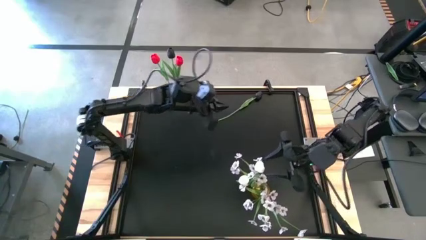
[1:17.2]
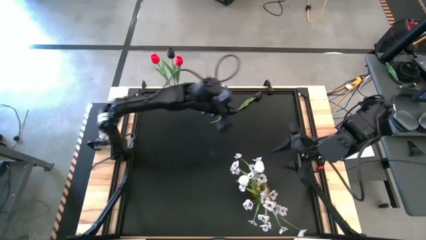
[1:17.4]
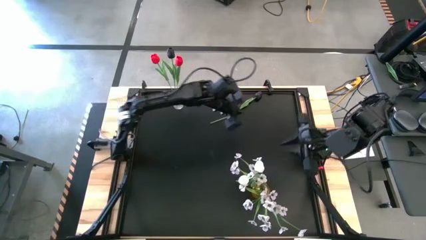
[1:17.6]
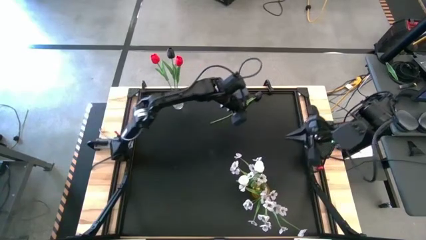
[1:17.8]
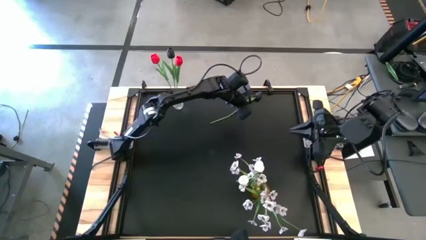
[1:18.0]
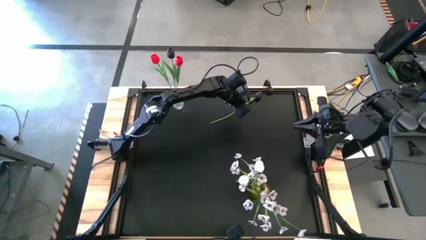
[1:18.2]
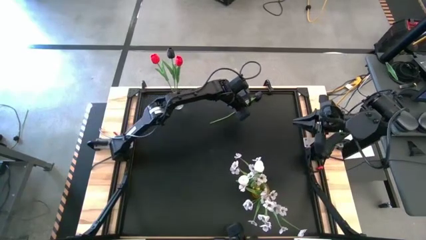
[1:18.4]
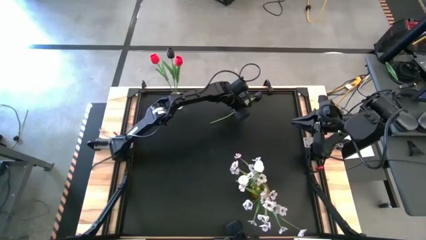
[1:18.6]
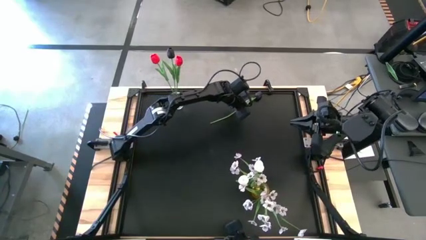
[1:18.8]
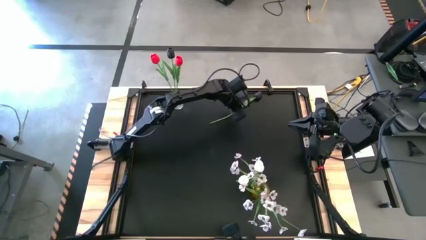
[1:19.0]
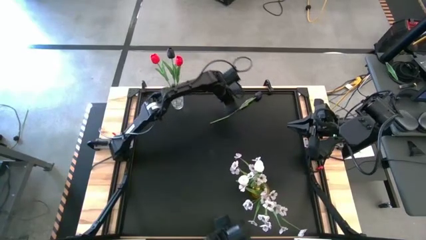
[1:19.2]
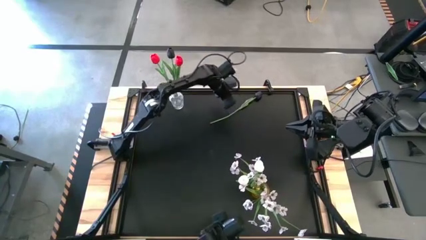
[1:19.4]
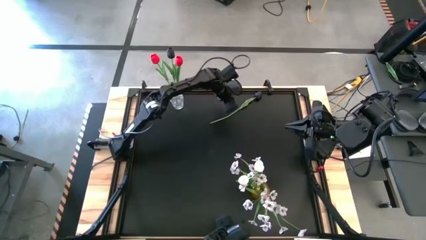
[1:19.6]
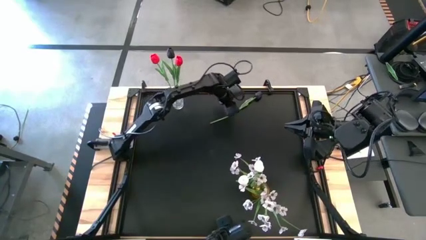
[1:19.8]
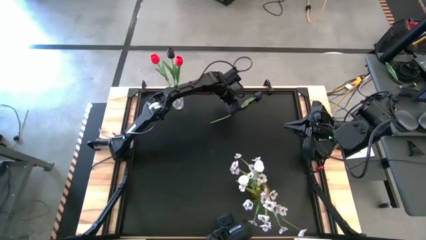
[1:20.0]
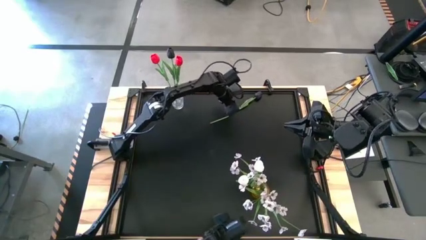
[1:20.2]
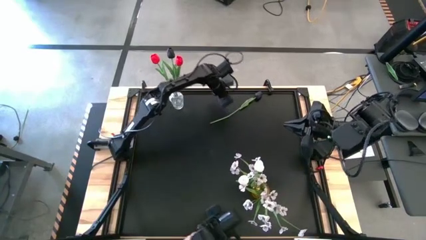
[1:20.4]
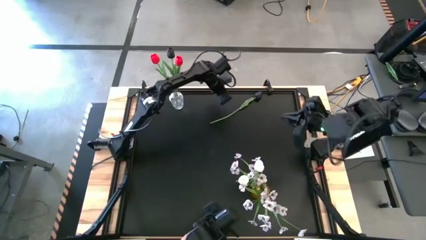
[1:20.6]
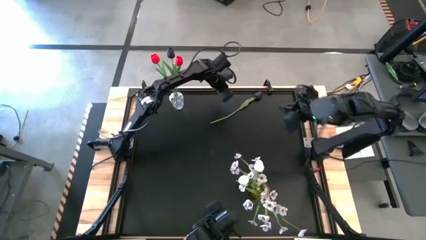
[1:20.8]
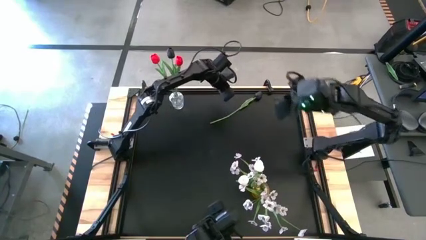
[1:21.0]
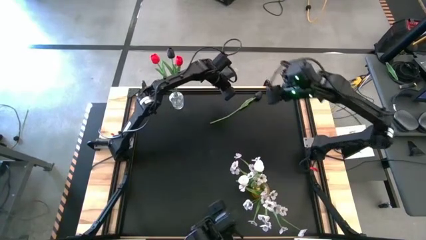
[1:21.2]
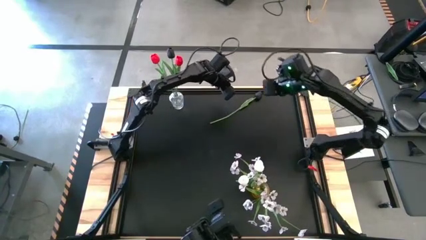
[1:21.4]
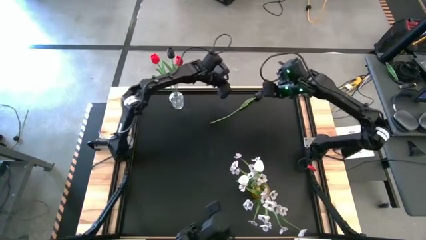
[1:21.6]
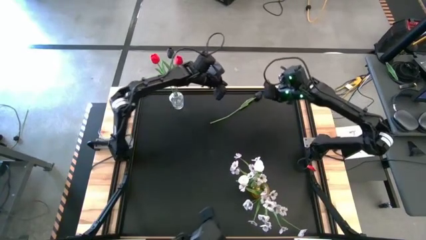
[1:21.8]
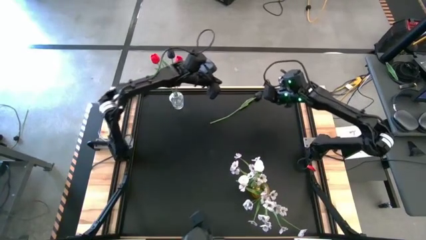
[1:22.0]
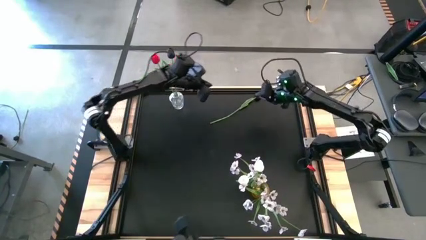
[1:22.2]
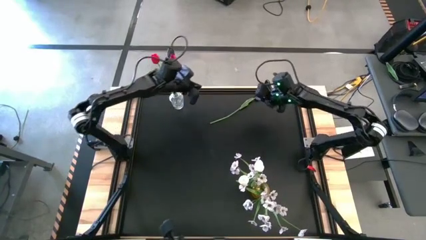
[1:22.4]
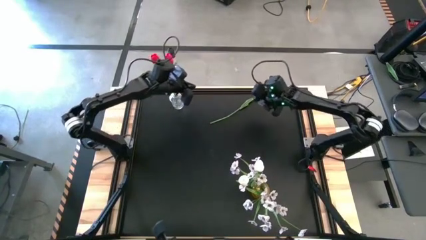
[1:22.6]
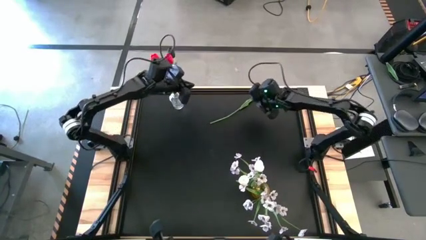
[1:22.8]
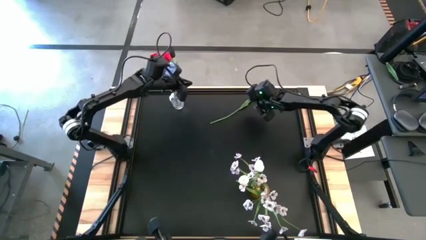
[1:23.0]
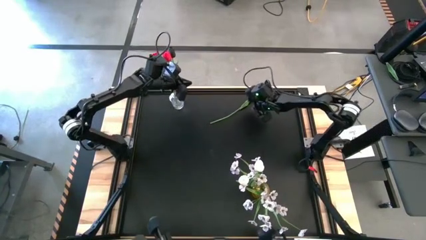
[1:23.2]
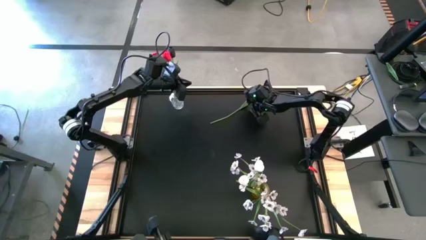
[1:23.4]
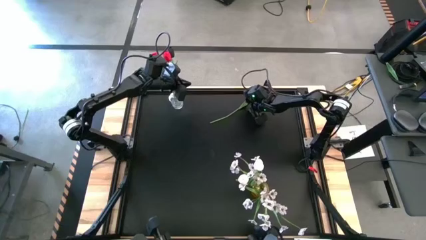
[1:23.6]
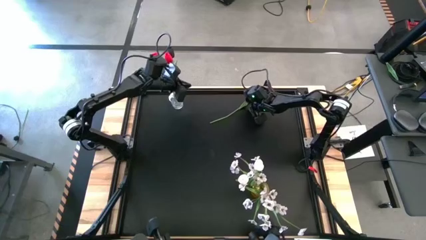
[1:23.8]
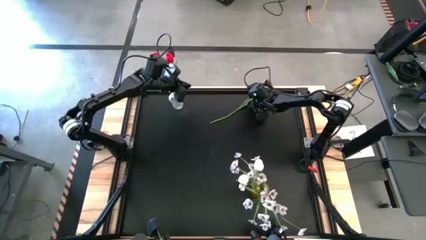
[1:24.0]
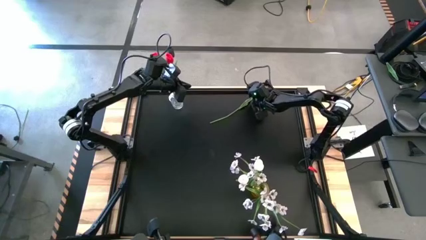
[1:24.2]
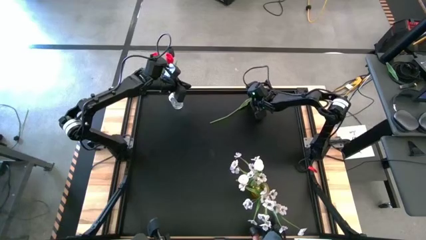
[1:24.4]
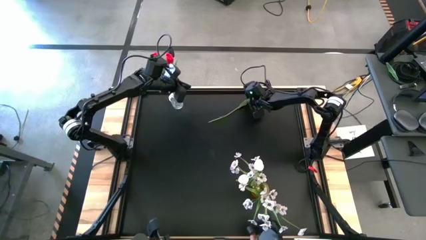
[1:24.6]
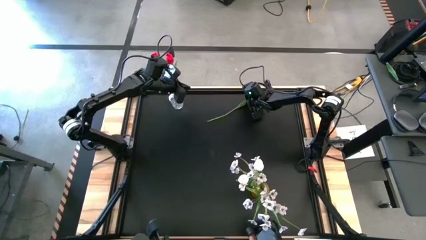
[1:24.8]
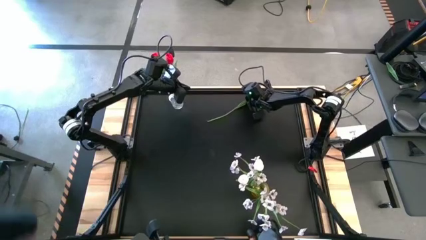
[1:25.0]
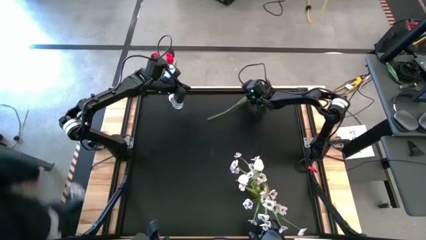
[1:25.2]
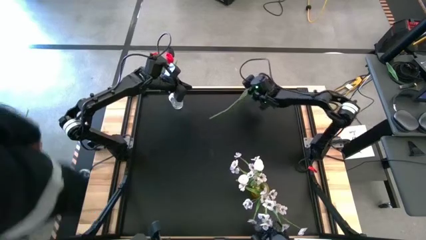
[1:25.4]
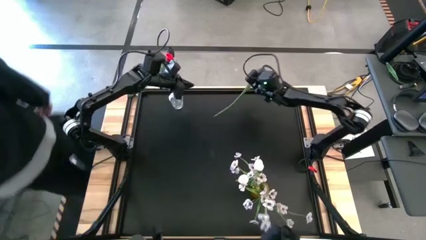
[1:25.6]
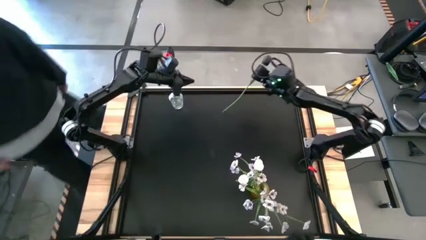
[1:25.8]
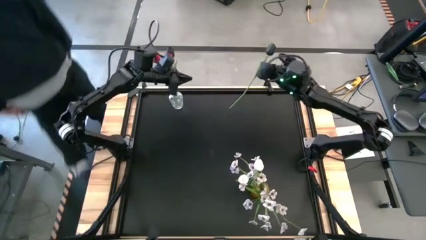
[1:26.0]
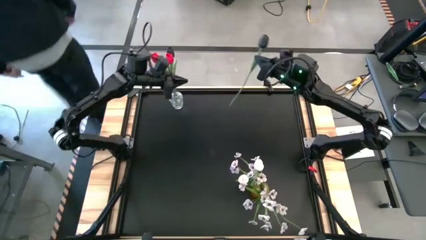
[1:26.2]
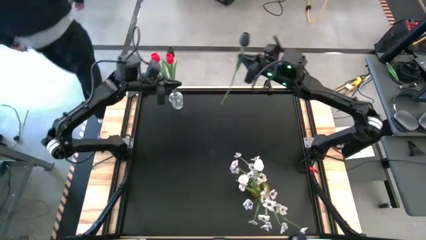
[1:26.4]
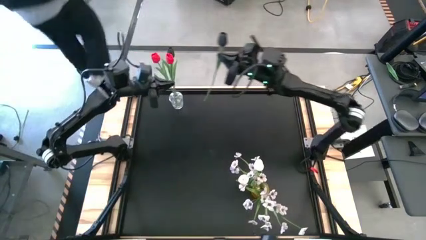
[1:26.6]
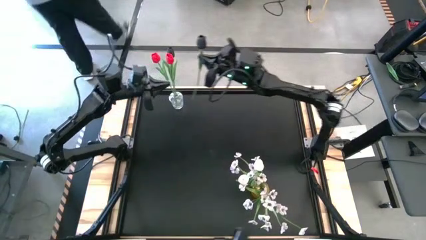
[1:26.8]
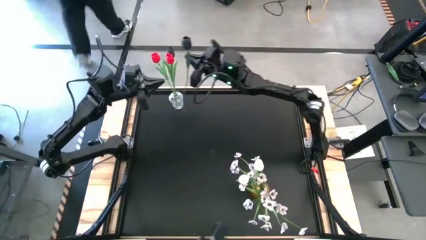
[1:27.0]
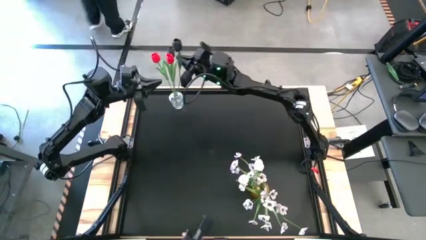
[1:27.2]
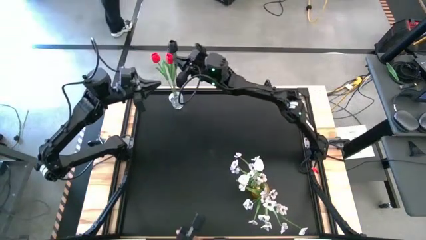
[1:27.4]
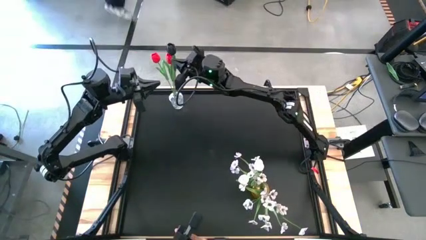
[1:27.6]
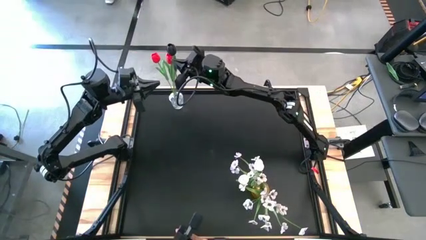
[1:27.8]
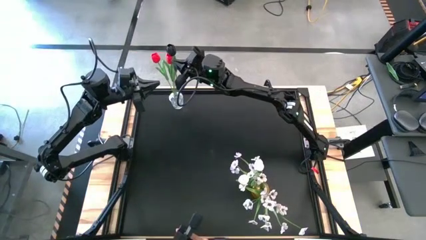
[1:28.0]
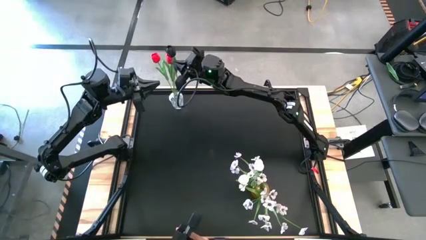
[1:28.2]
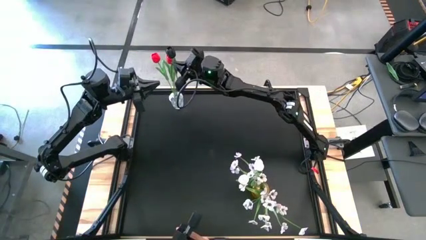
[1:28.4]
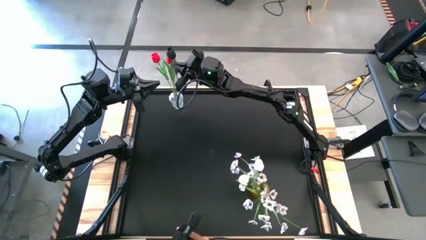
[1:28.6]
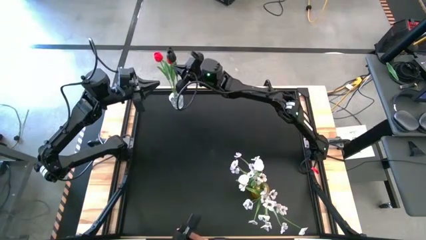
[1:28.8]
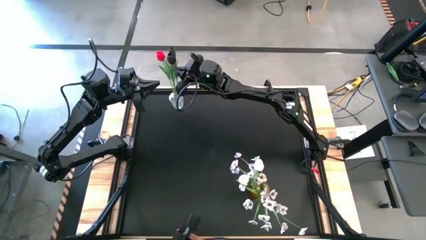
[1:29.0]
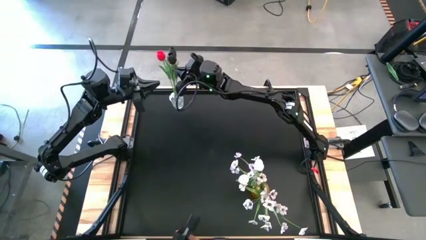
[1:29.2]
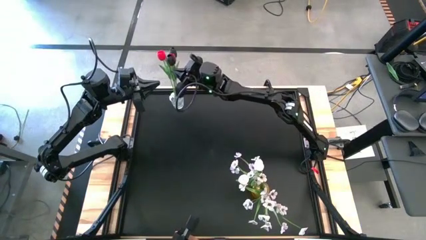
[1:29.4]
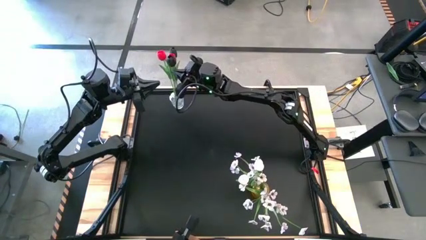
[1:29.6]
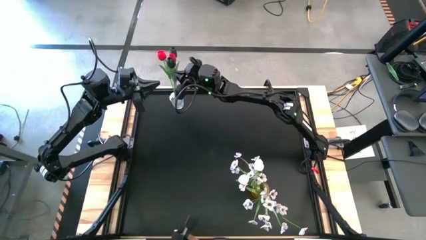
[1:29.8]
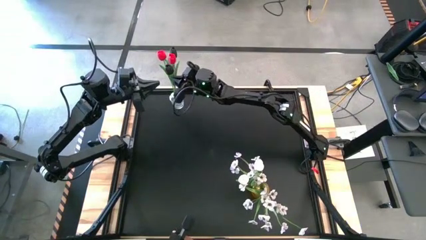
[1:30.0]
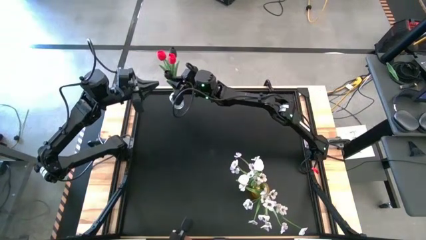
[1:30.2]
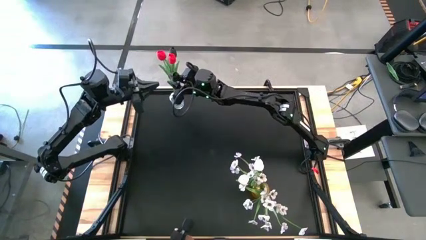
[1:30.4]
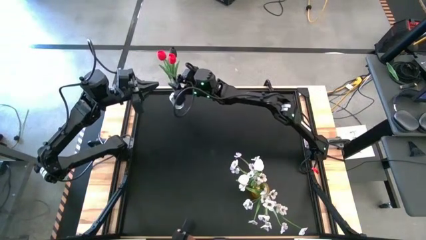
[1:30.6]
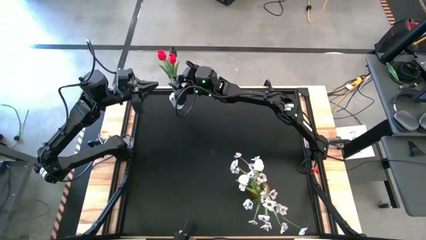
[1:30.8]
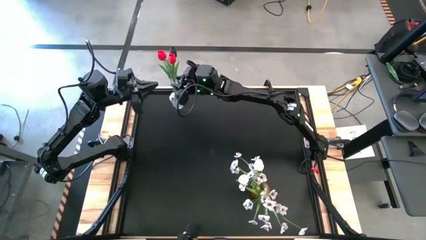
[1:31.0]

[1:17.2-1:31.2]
Task: Sort flowers into vase by color
Put the black flower into the transparent vase

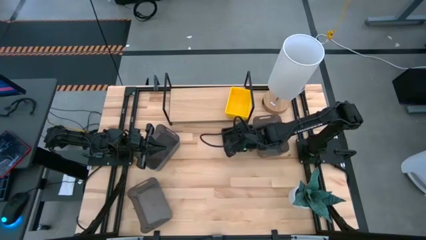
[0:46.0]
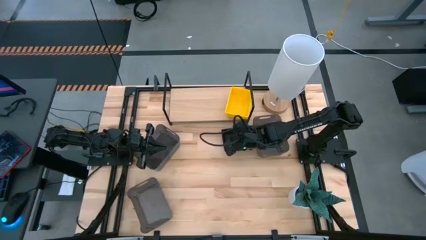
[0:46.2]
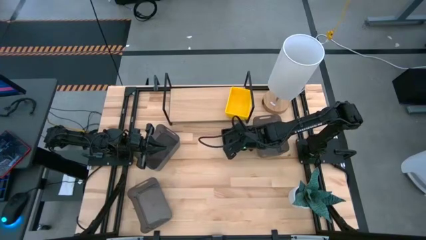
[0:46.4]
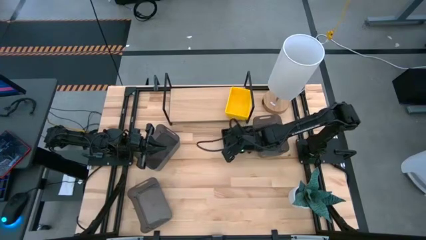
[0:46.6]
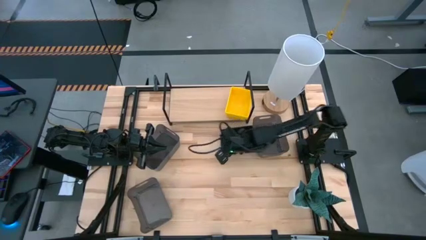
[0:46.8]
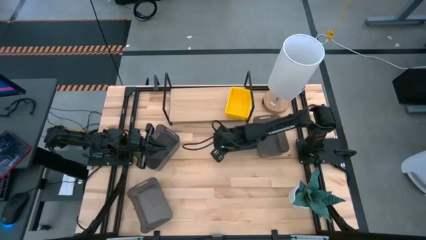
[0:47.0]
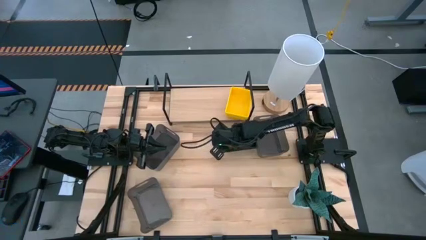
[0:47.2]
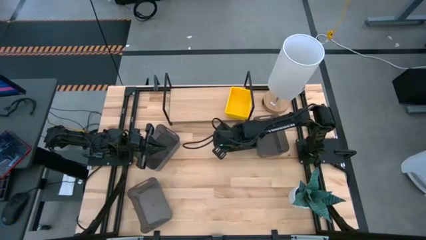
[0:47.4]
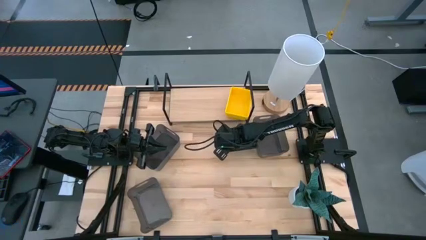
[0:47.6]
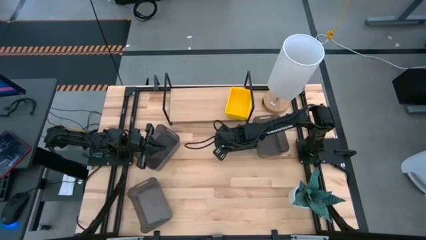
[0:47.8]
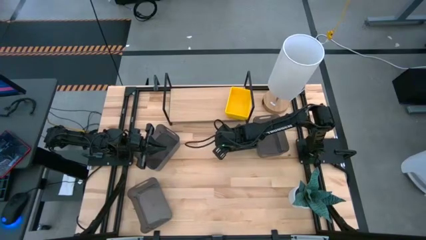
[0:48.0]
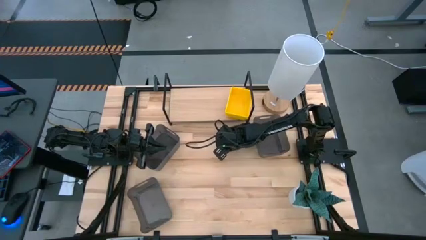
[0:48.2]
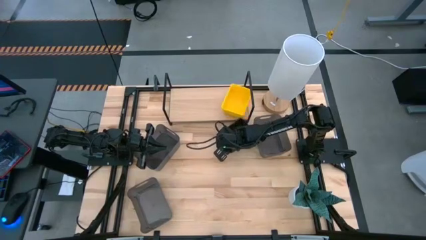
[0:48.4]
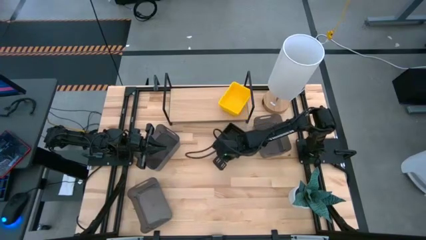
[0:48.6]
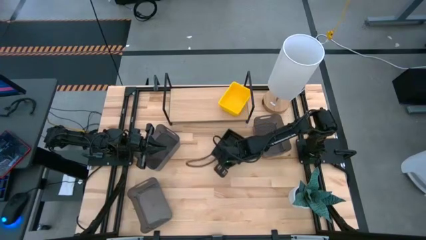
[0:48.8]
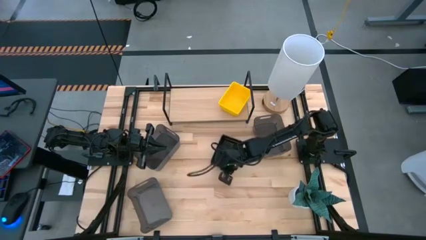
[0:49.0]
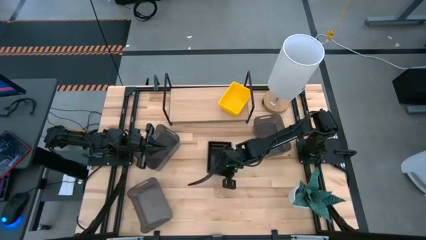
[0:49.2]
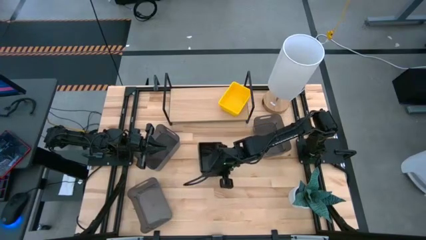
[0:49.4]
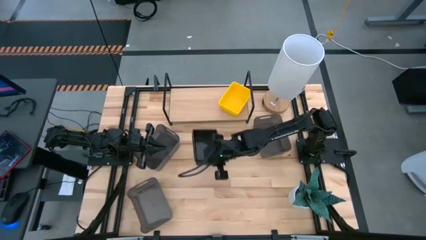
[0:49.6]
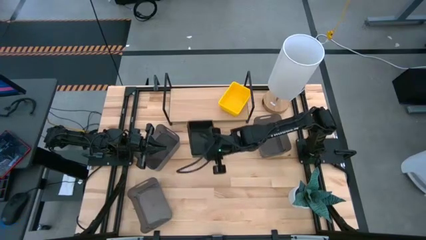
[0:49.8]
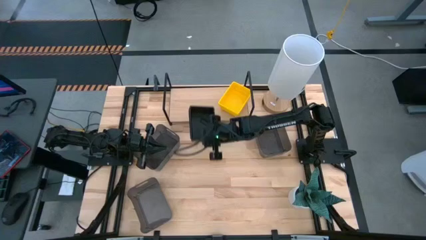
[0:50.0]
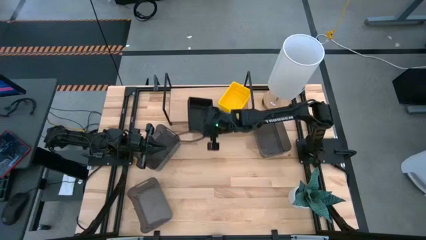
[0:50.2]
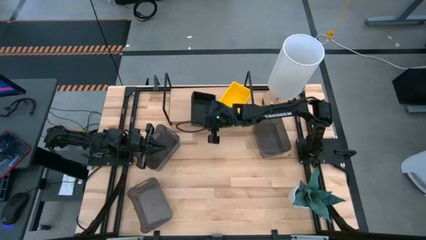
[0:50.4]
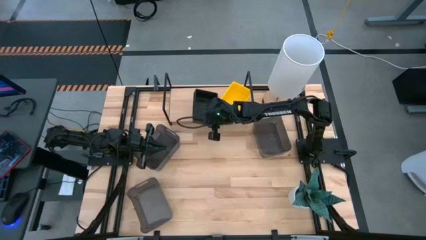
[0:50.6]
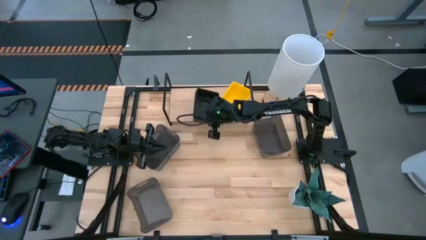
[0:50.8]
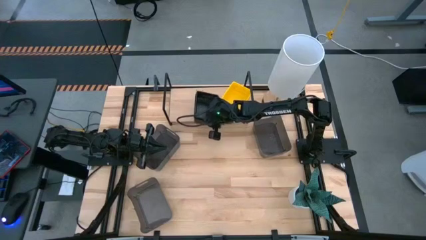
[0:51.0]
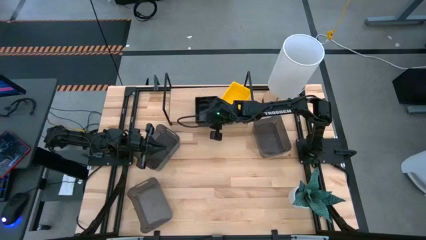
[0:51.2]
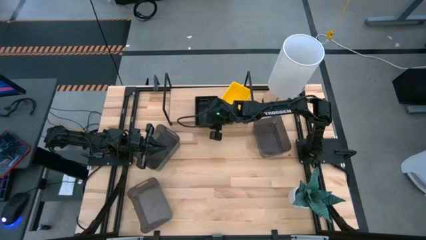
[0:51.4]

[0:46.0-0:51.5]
Task: Stack baskets on shelf by color
Put the stacked black bins on the shelf
